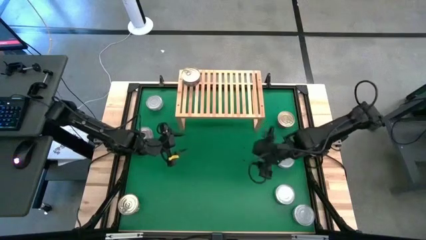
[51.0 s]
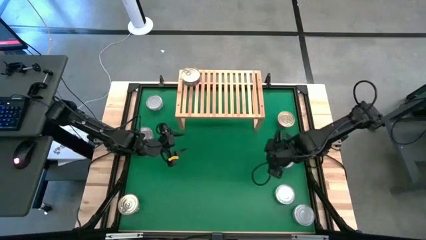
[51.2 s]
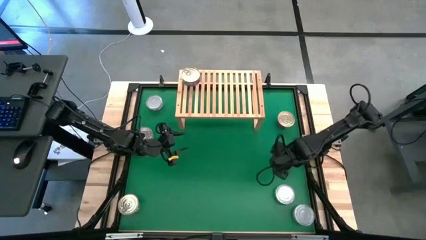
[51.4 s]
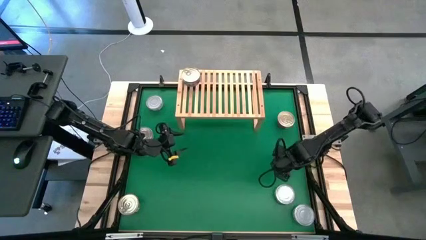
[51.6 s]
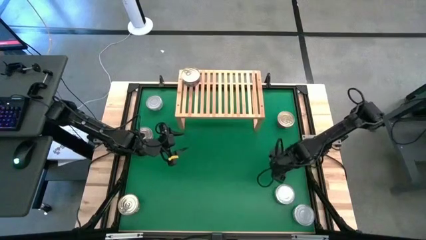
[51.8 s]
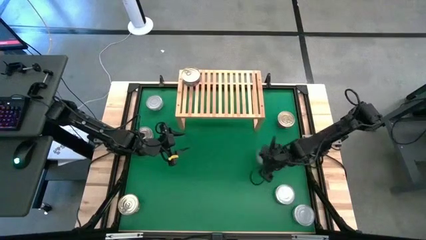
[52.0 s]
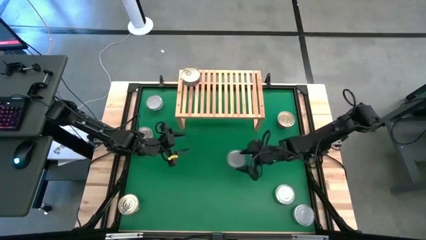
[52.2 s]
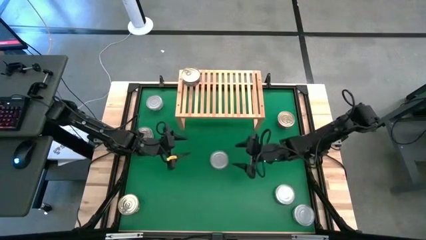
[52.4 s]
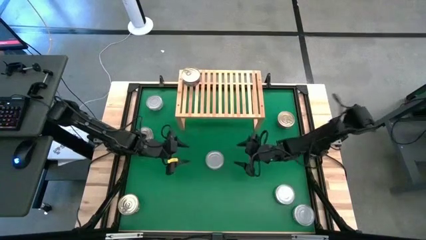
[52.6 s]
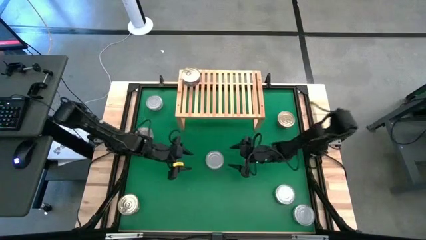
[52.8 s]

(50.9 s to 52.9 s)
Task: Stack canned seafood by type on shelf
Move the top right green tuna can to the center of the table

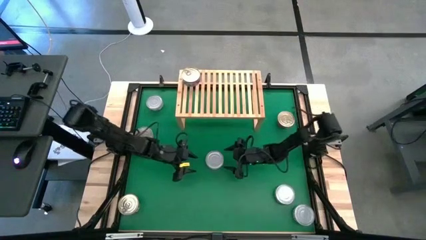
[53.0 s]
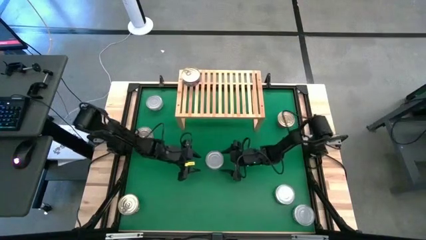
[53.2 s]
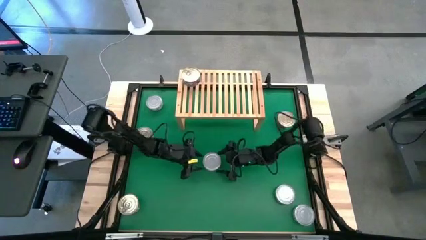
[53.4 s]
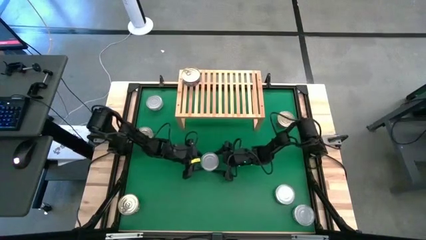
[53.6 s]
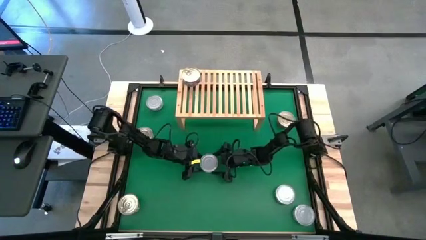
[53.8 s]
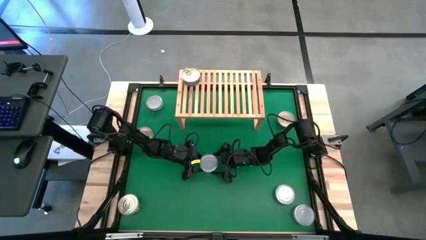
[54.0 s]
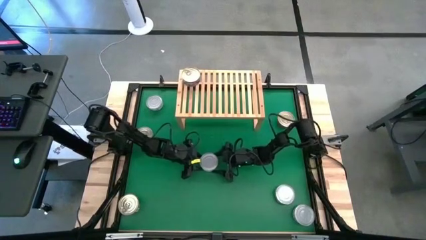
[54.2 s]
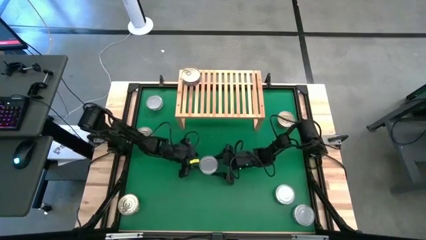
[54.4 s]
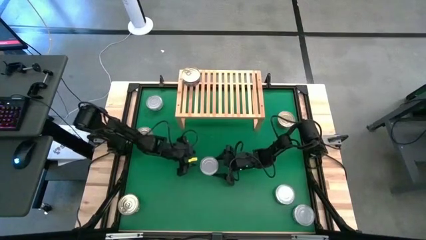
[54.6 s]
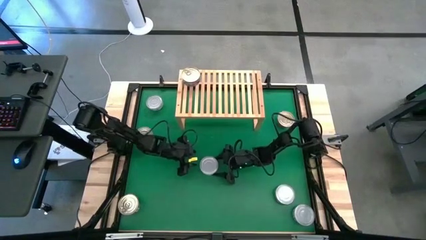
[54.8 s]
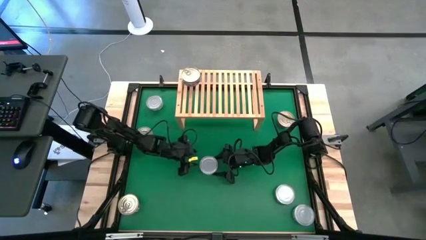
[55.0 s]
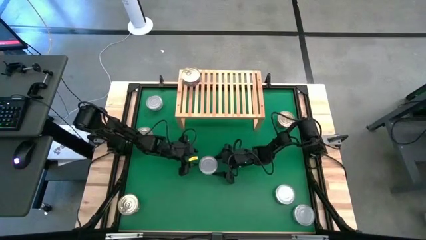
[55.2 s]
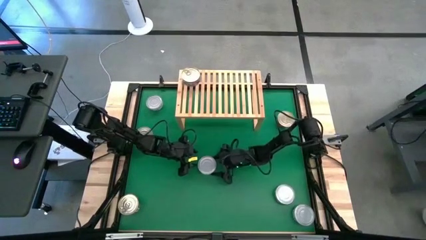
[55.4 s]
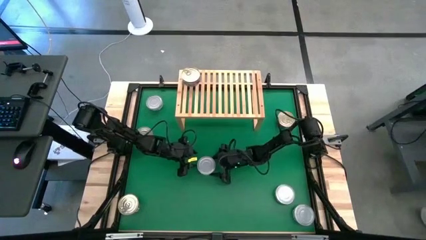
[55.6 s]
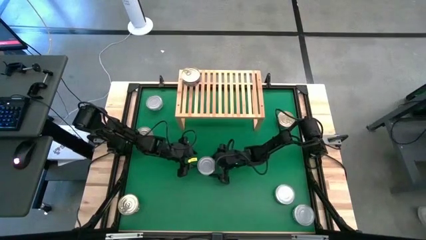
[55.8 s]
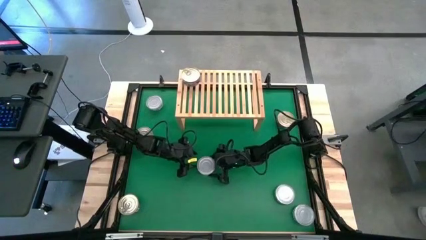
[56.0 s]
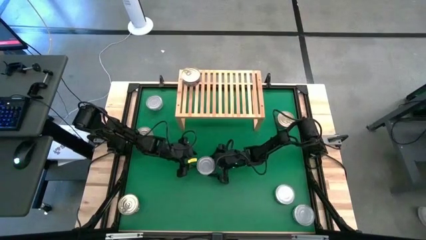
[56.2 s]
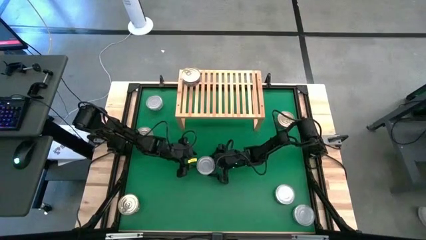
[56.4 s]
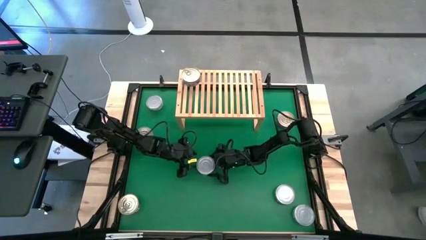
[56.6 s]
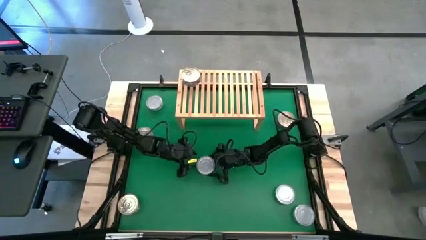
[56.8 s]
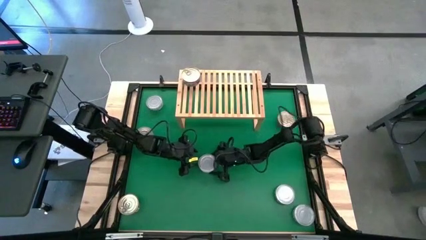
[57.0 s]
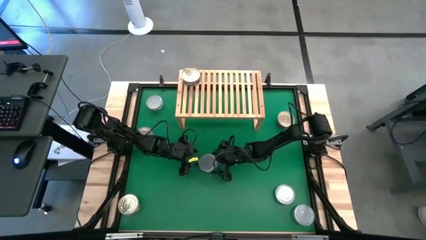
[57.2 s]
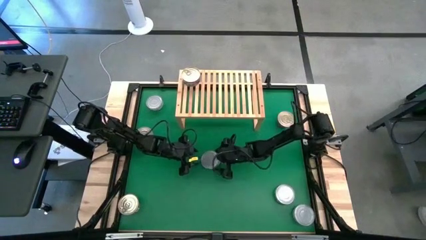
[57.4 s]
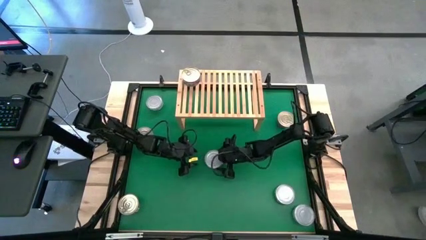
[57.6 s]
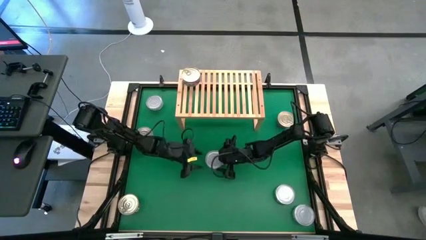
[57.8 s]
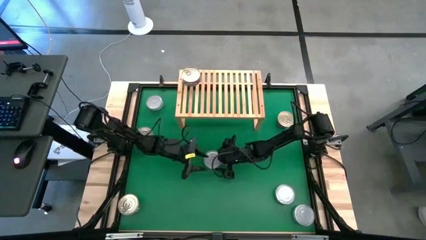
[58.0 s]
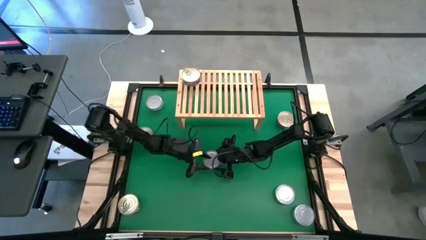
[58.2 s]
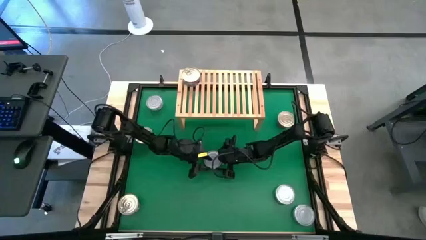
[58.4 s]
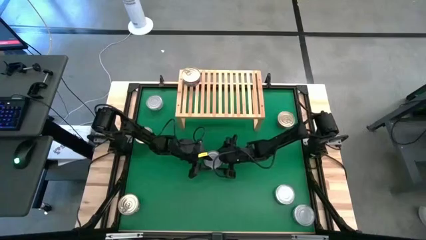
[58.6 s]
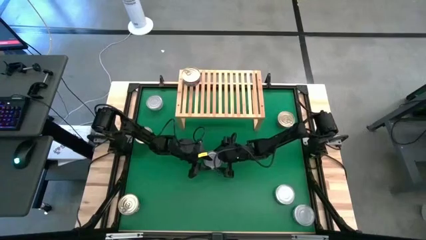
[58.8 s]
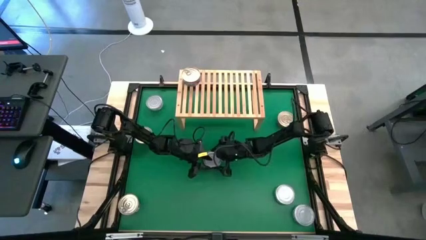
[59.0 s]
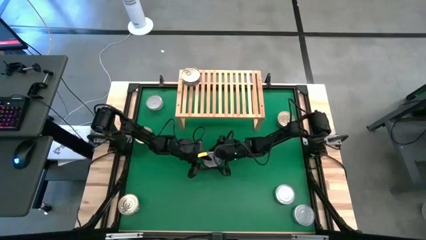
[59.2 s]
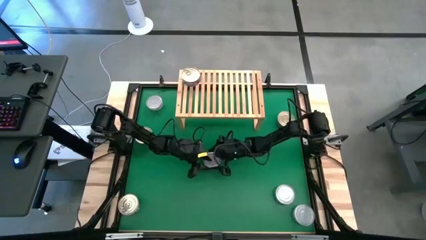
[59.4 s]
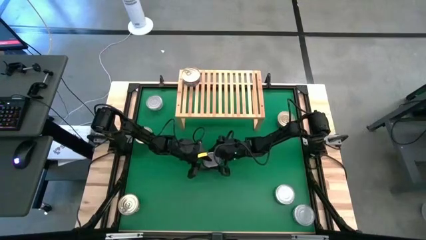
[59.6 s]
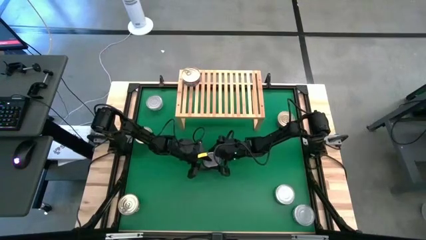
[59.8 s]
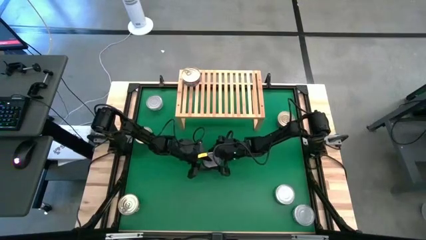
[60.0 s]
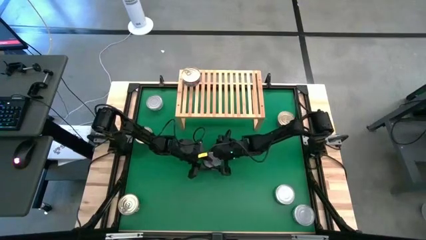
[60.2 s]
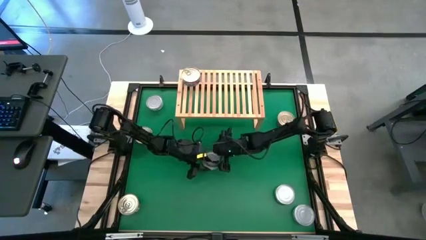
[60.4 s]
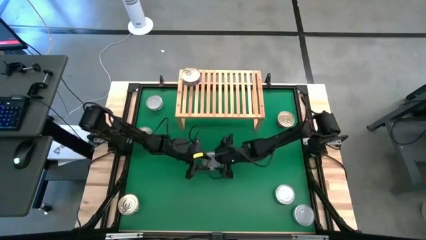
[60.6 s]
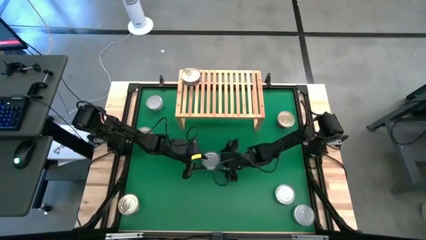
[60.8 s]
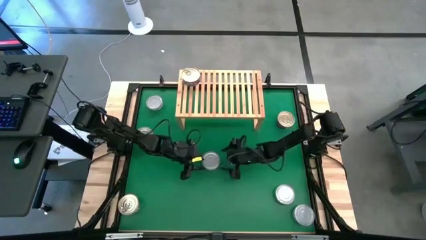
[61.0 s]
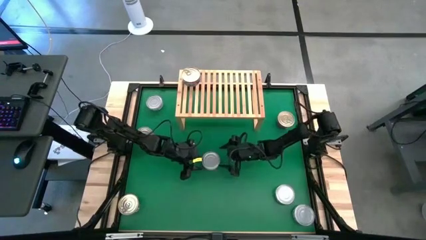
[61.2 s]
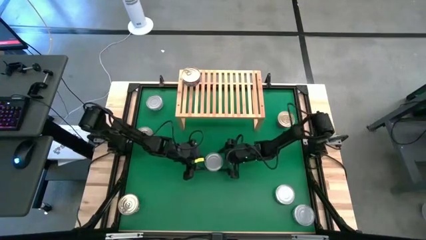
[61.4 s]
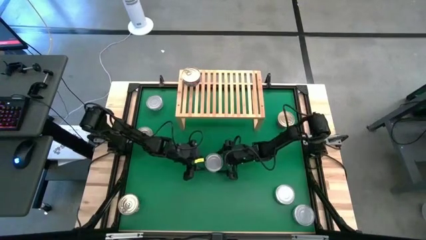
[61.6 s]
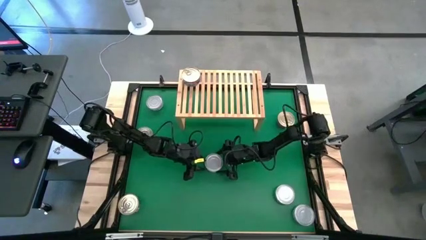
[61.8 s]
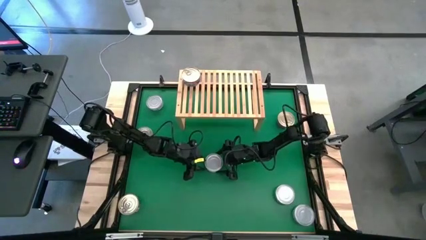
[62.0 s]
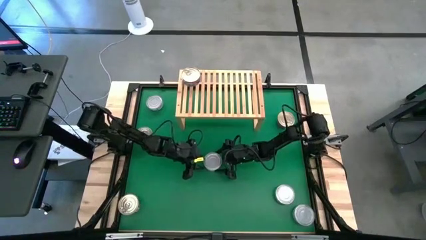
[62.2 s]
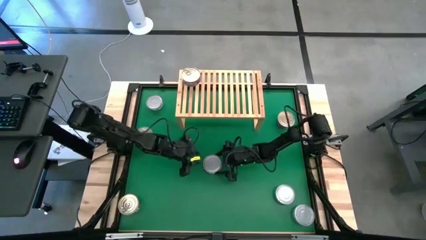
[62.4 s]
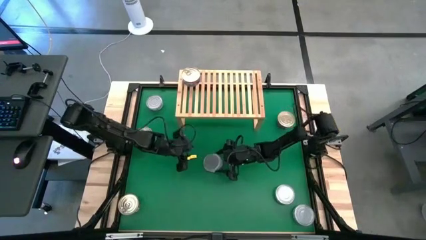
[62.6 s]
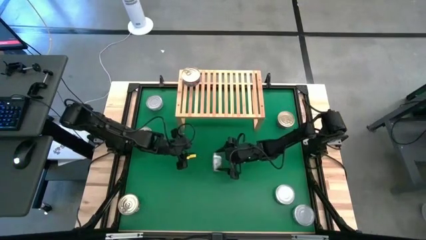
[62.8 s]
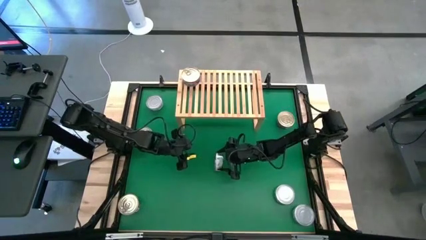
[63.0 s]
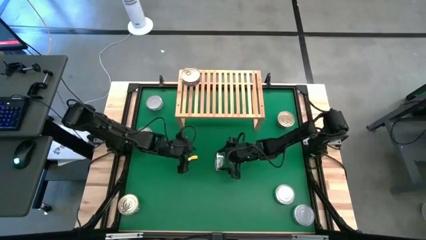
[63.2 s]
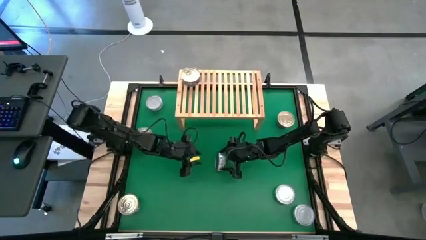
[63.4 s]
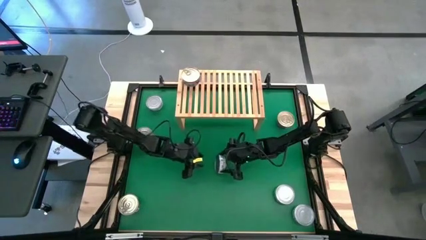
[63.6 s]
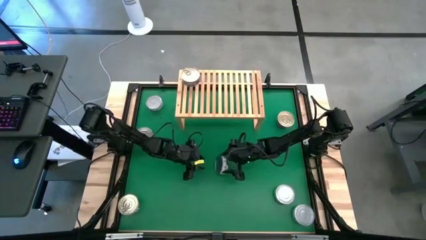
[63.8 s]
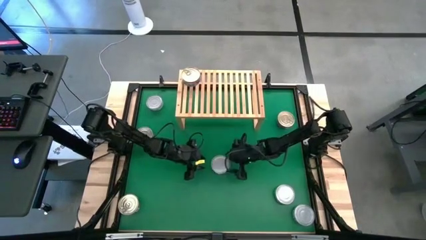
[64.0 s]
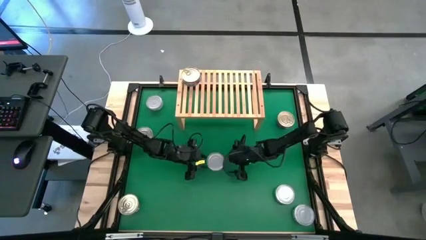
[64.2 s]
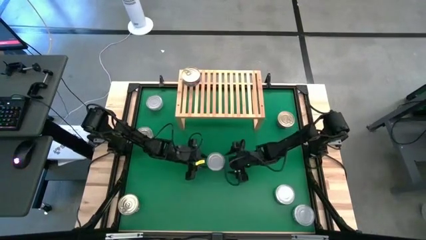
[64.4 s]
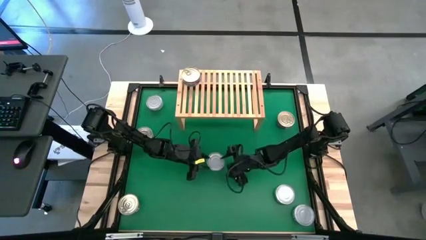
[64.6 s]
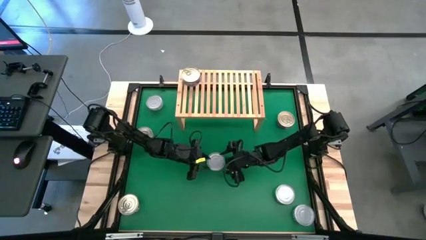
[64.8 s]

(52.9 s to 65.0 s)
Put the center green tuna can on the shelf
